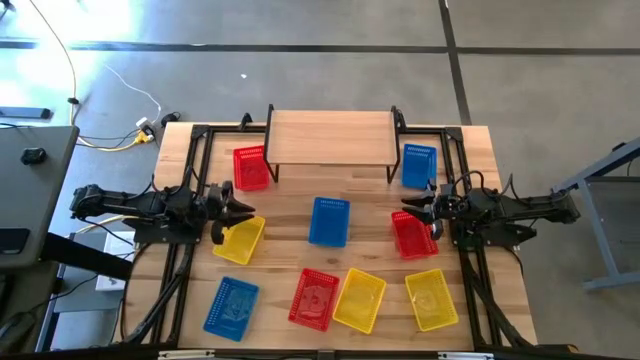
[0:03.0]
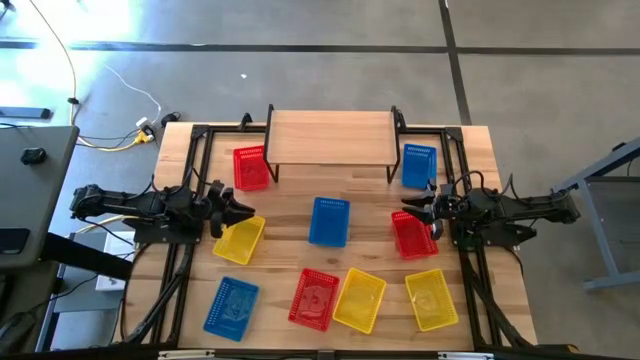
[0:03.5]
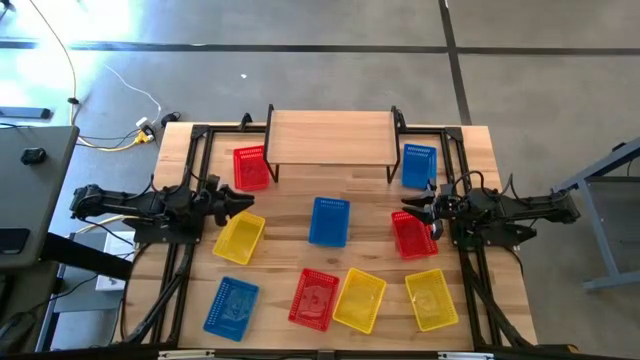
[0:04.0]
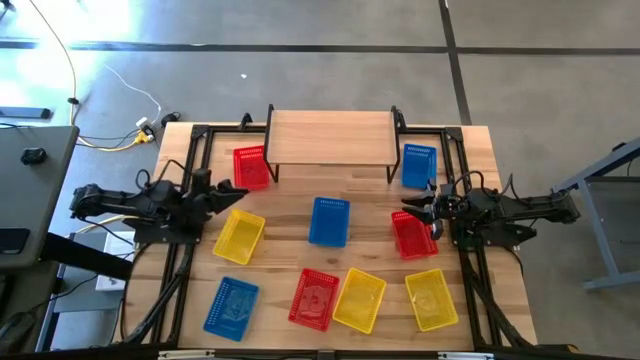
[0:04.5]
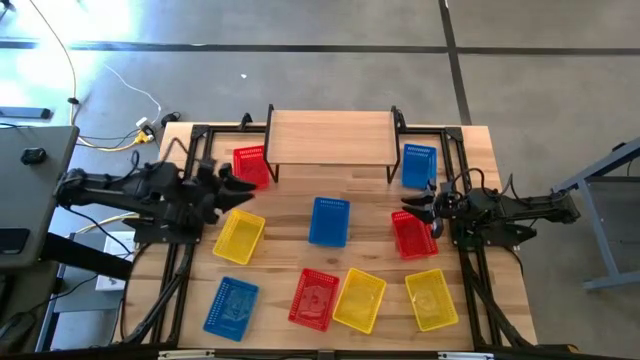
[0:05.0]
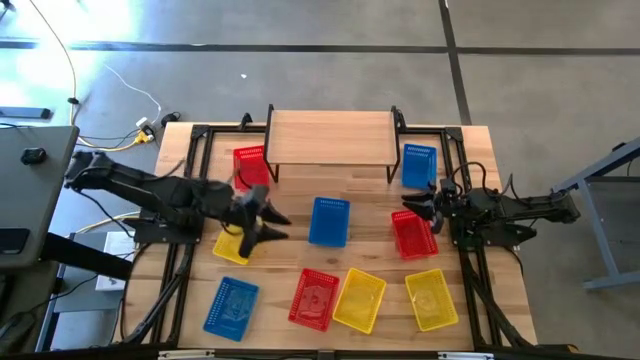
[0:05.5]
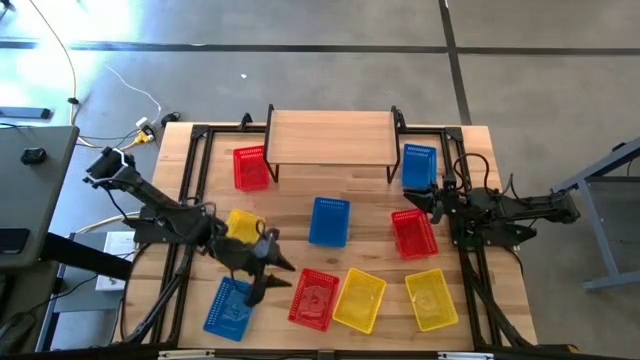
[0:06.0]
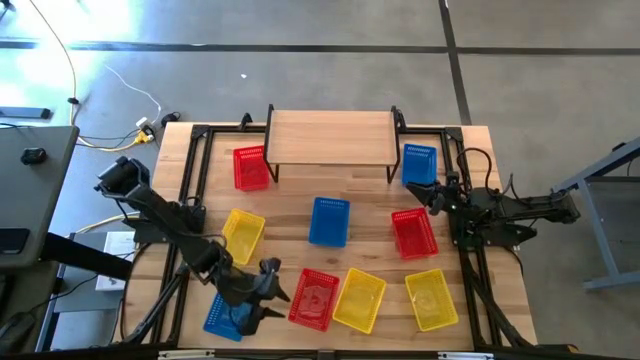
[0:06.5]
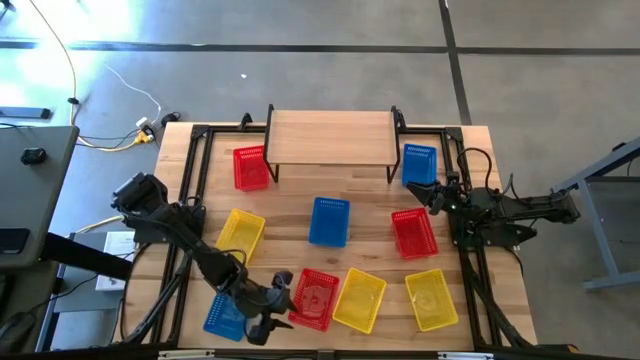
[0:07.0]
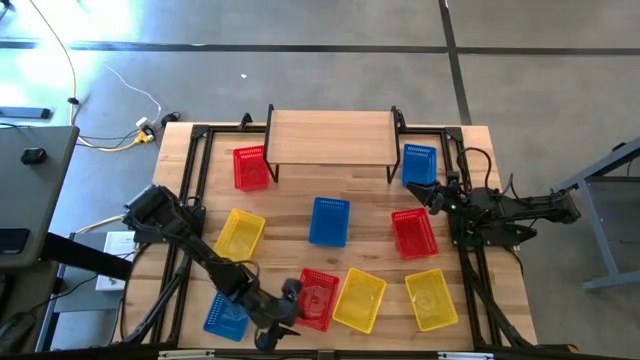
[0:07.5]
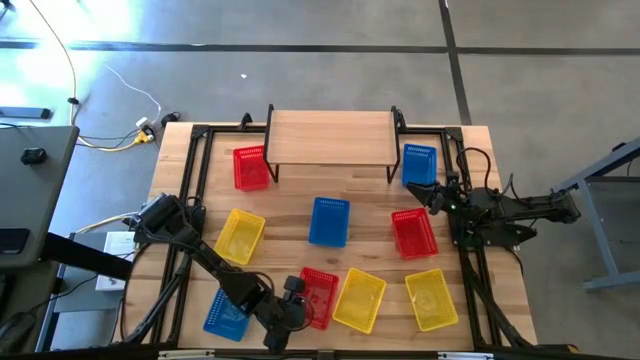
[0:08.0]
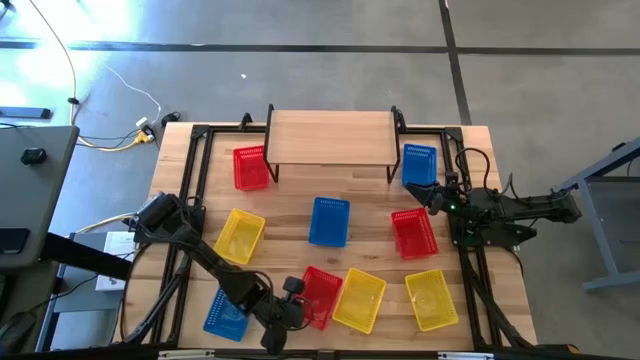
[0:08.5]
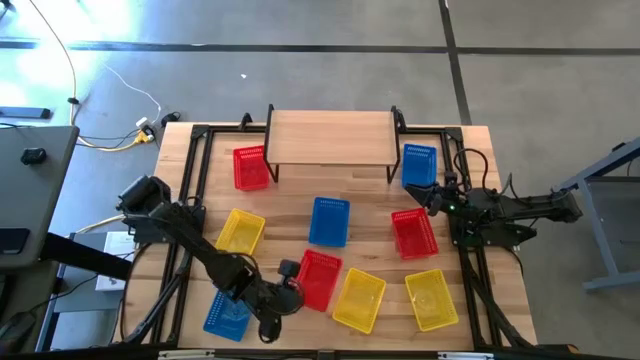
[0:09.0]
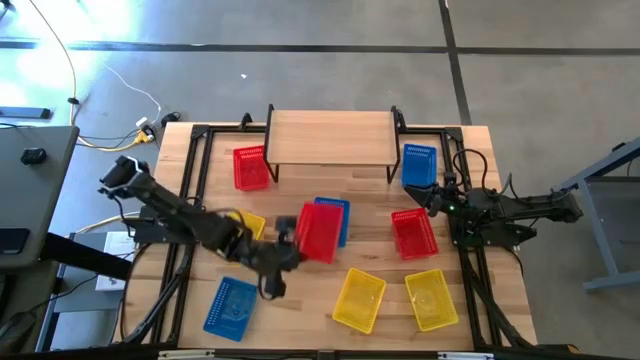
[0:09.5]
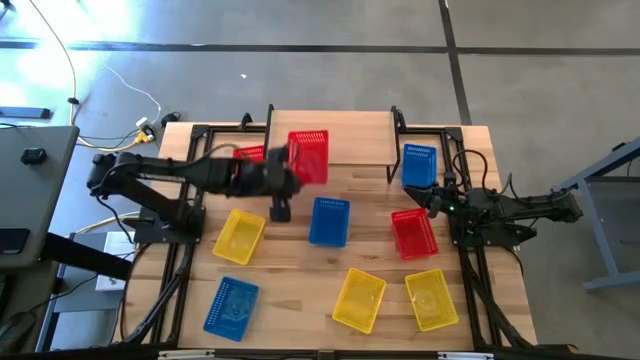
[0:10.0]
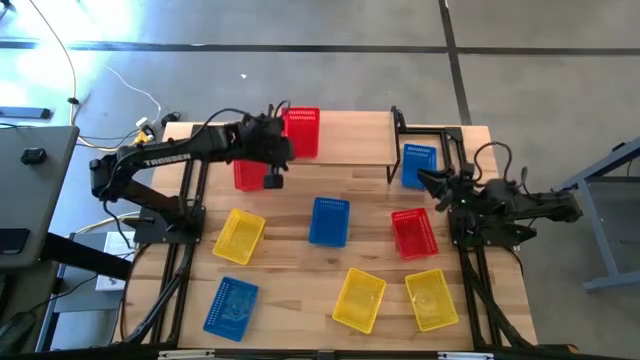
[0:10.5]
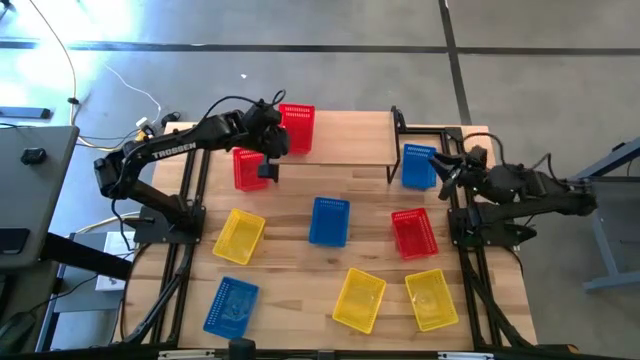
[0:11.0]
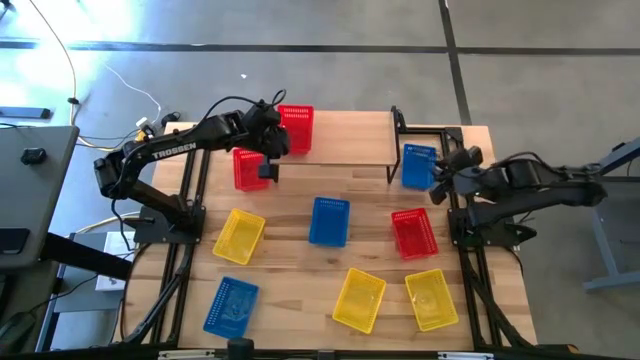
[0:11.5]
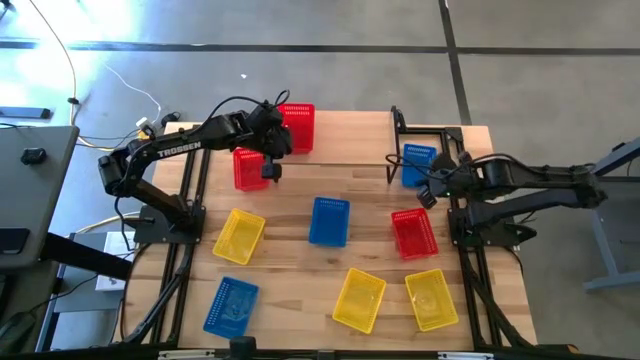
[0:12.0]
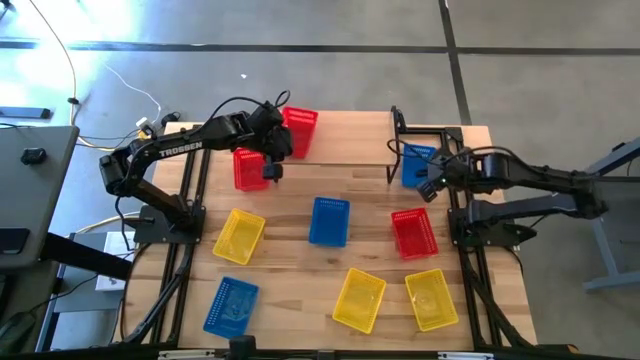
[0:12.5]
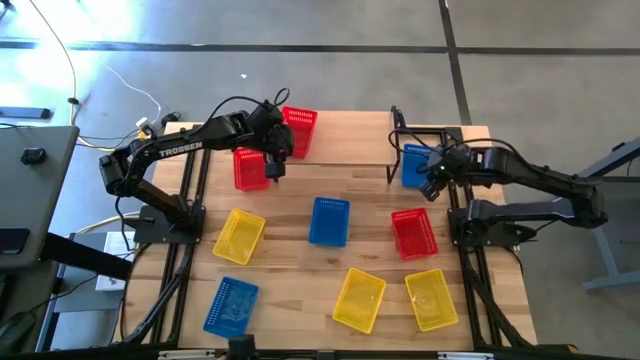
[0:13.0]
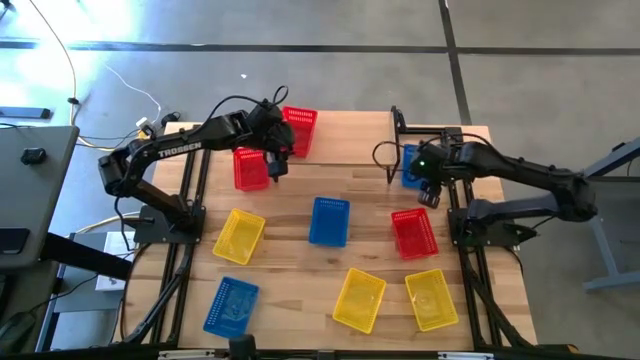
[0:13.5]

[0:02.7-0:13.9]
Task: Stack baskets on shelf by color
Put the bottom red bin on the shelf

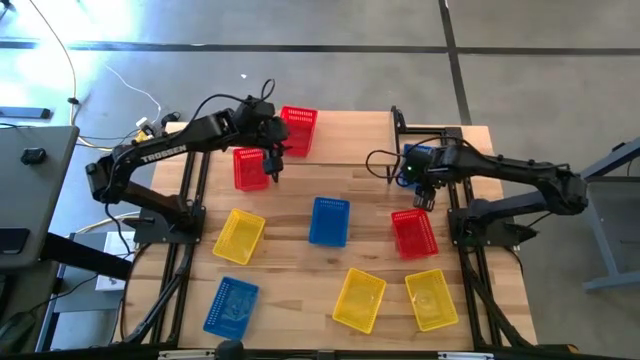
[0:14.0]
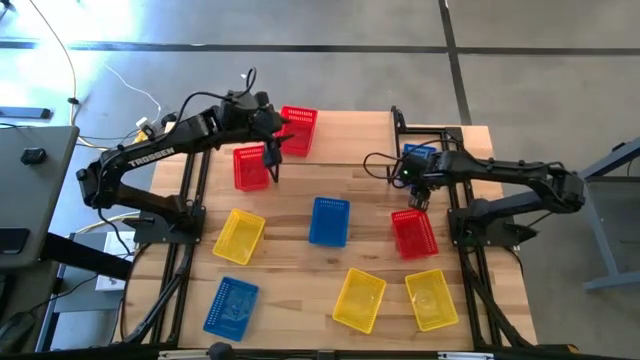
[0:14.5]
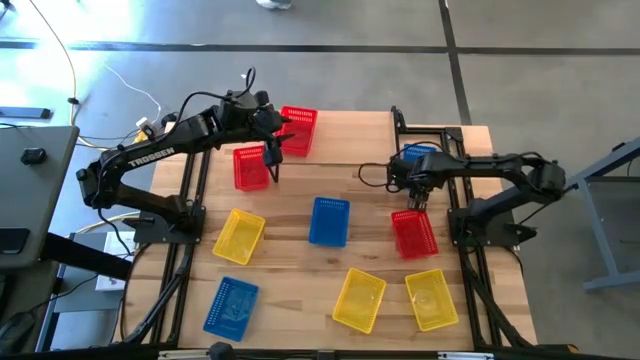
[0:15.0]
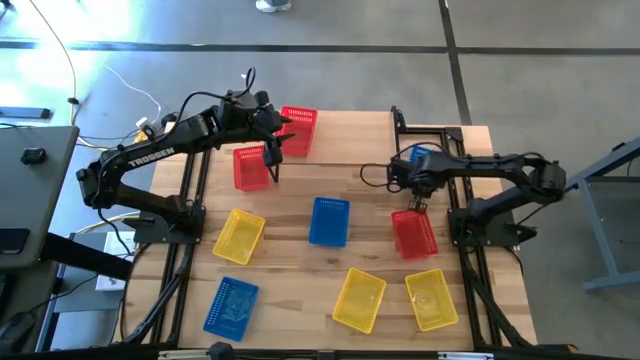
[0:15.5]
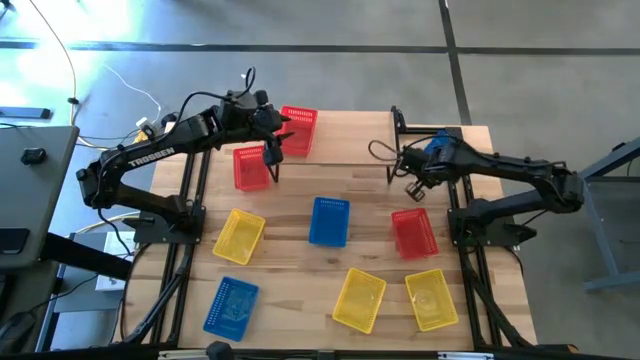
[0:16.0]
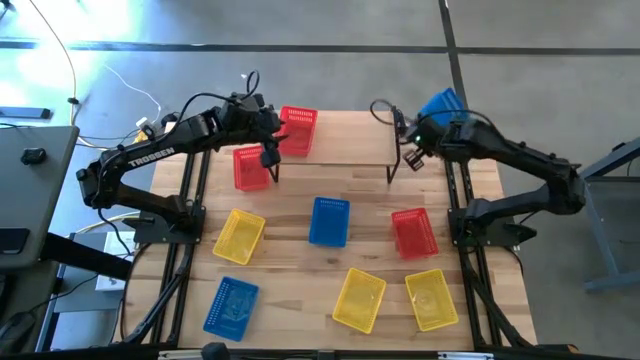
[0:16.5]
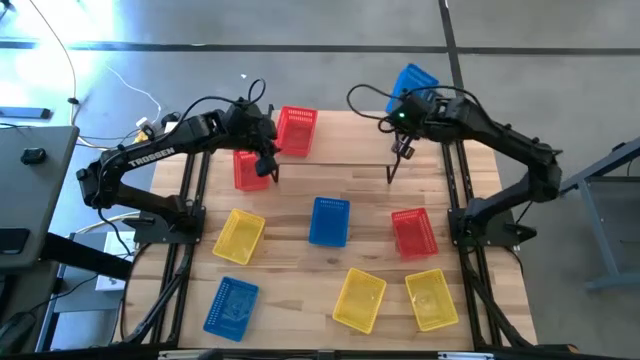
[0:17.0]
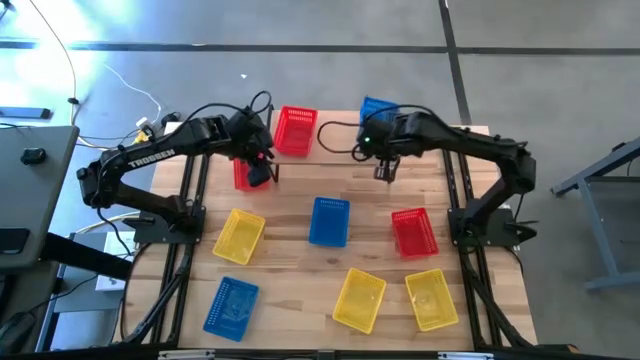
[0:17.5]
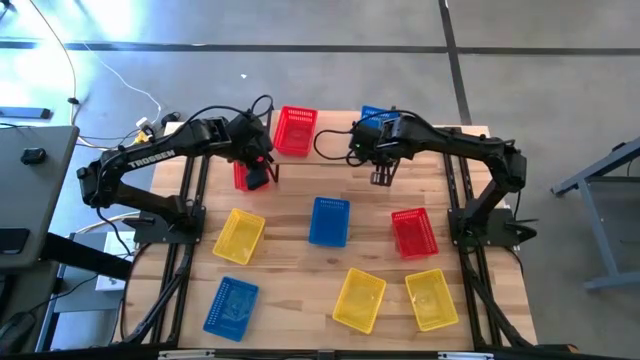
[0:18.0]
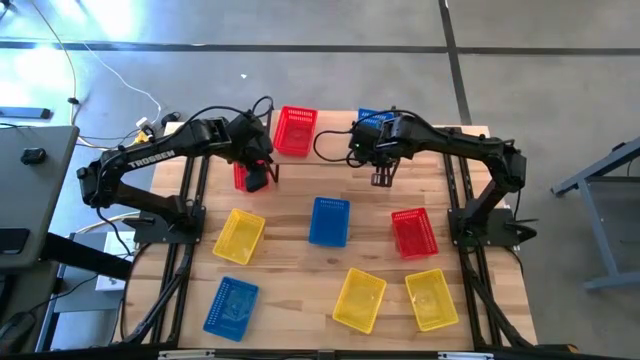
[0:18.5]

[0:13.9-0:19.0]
Put the top blue bin on the shelf

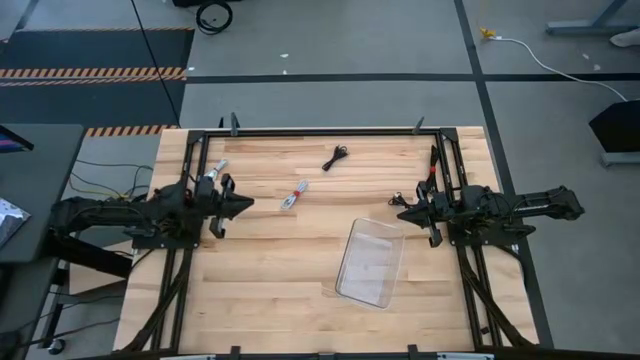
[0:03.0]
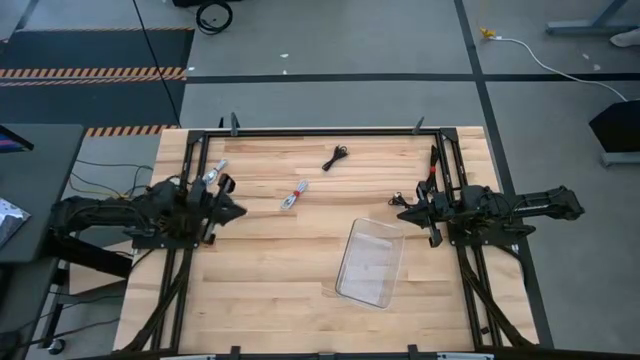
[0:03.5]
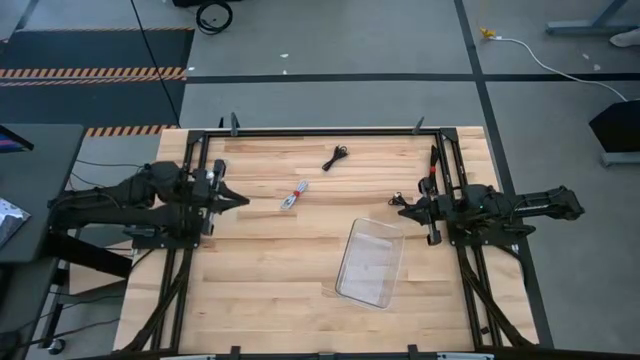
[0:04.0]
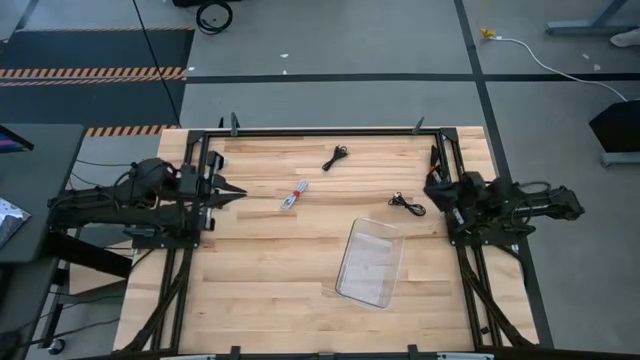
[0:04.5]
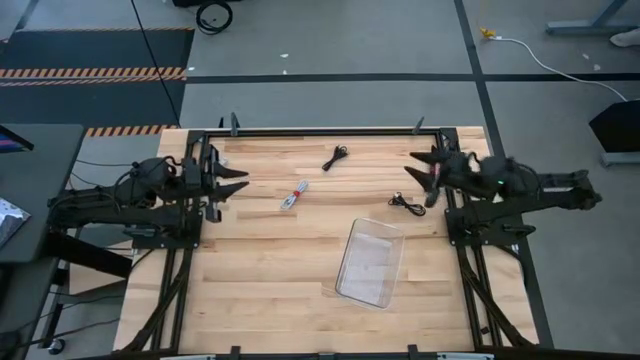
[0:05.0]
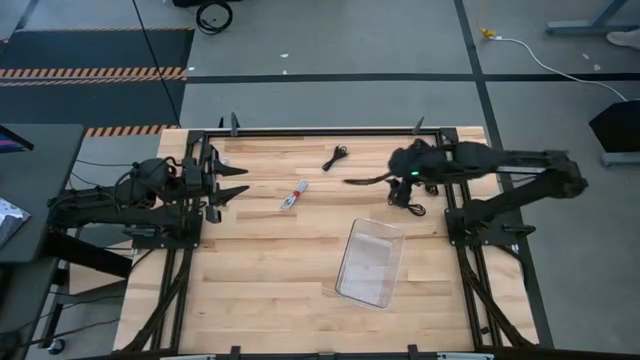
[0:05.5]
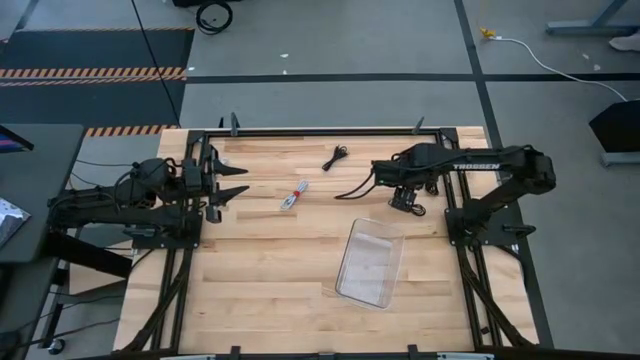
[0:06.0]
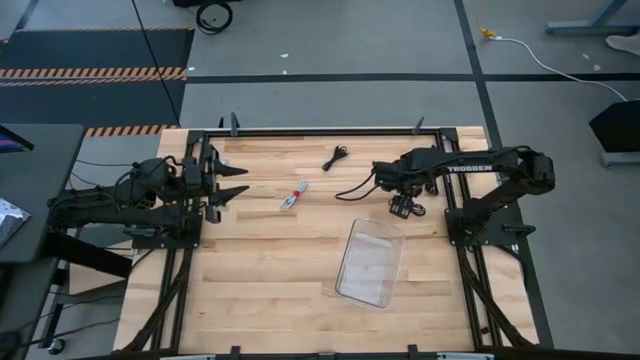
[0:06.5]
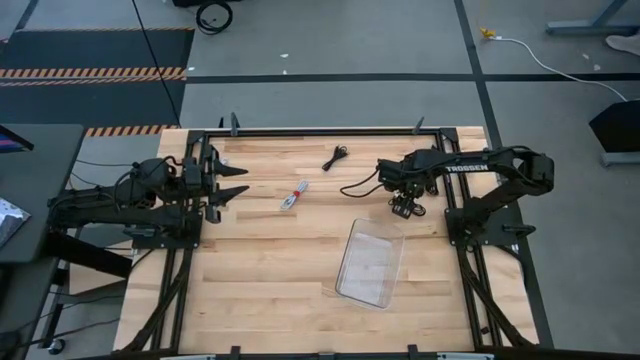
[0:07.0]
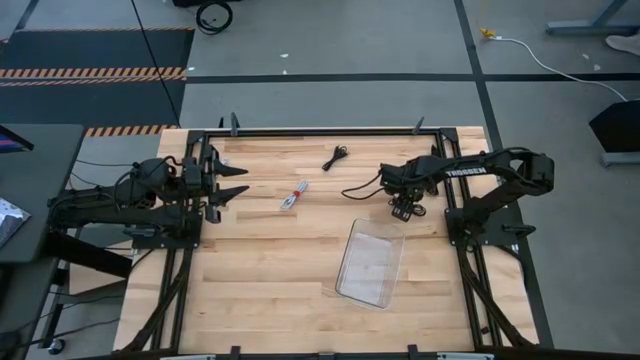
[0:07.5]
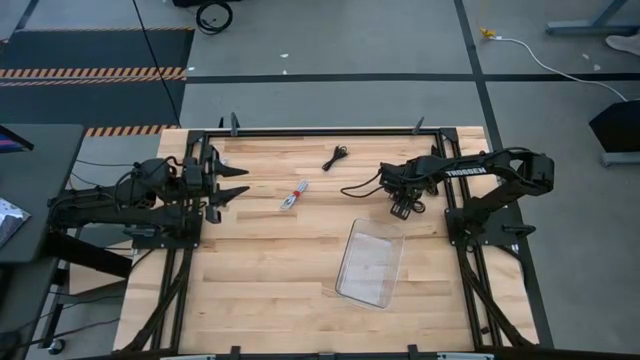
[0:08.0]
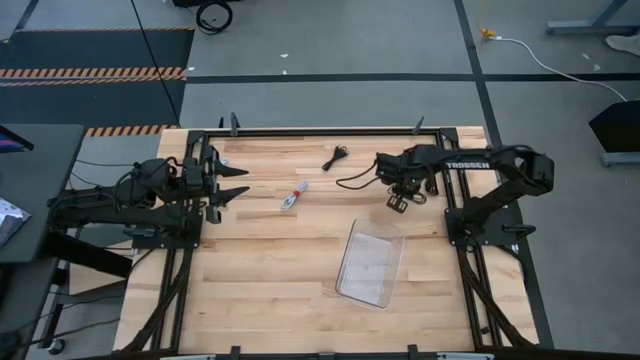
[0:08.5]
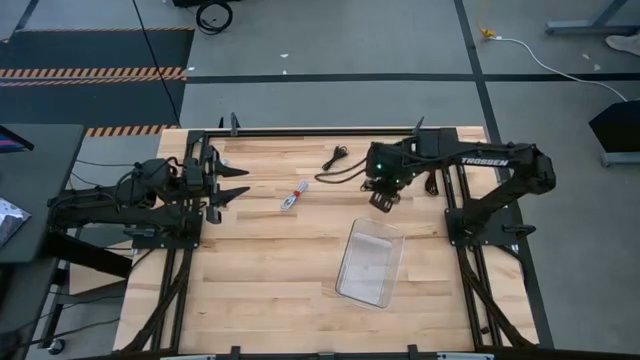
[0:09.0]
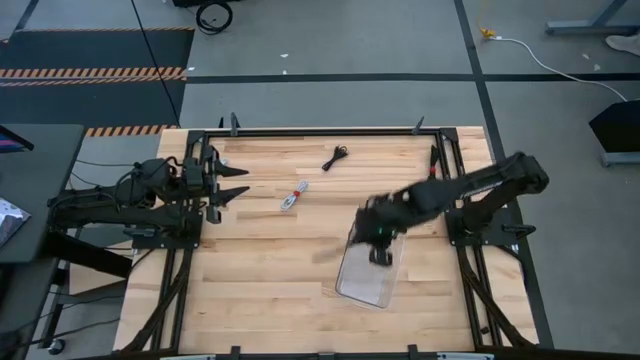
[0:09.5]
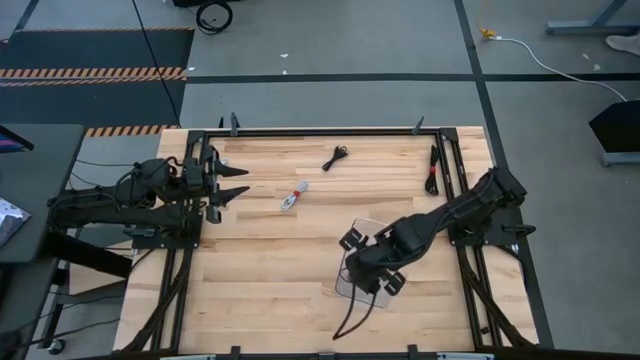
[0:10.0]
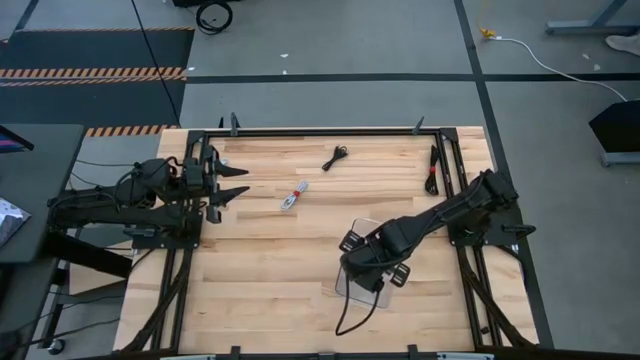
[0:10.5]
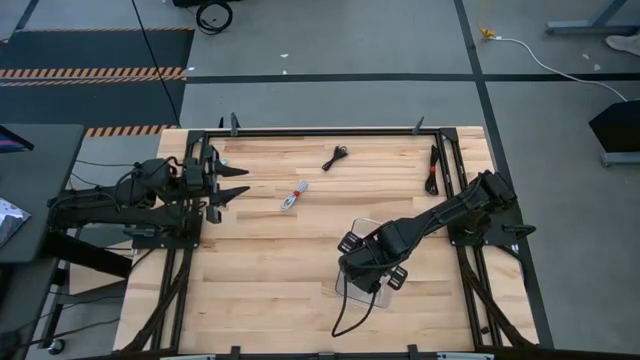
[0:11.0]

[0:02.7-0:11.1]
Task: Pick and place USB-C Cables
Put the middle black USB charger cable into the transparent bin
